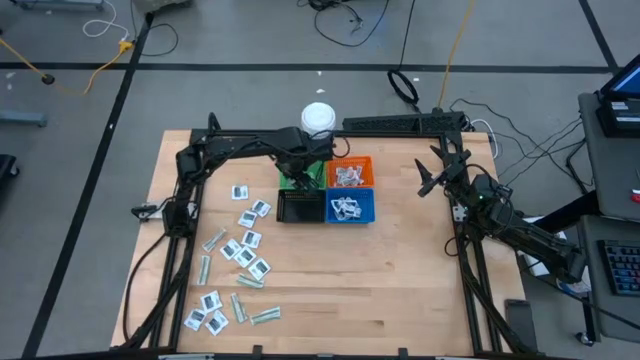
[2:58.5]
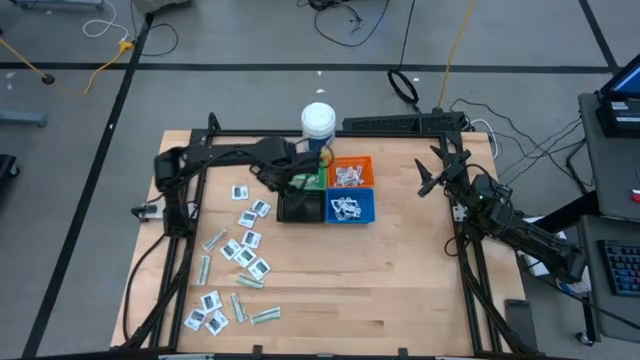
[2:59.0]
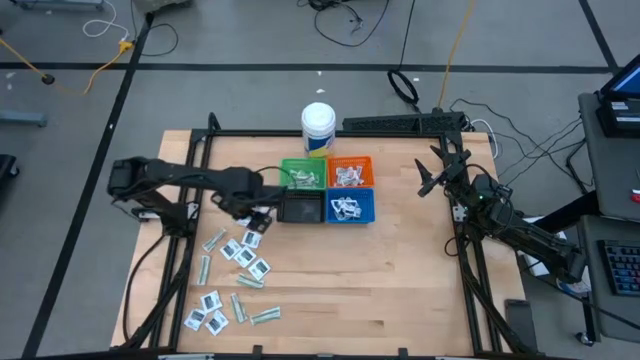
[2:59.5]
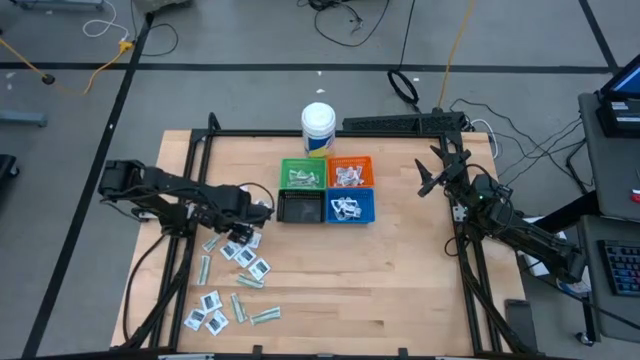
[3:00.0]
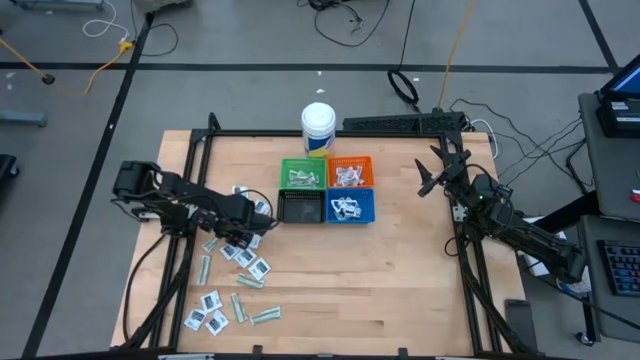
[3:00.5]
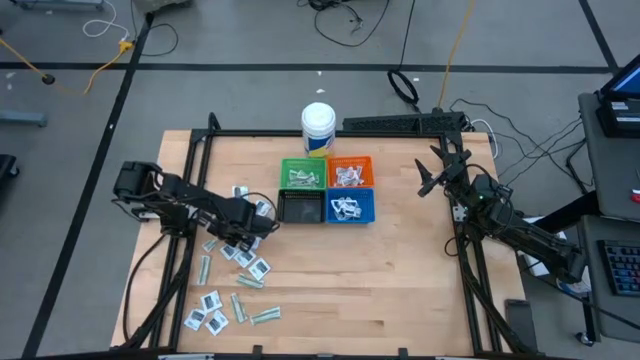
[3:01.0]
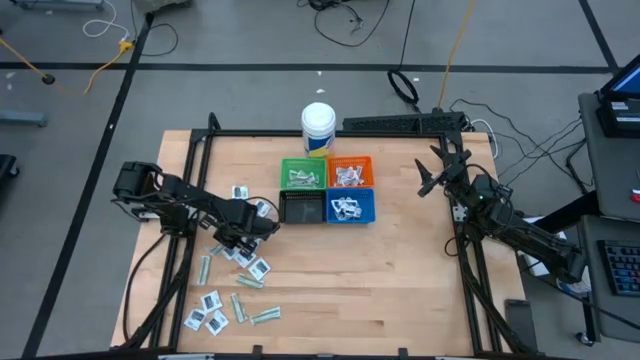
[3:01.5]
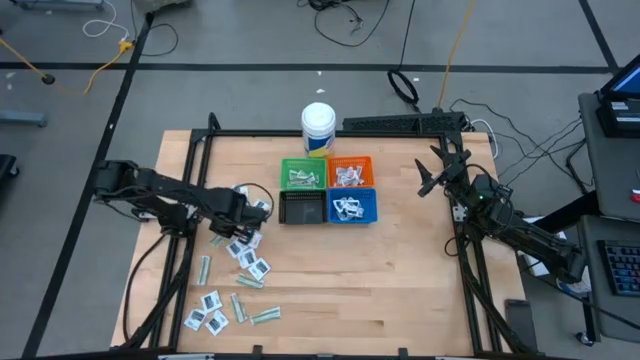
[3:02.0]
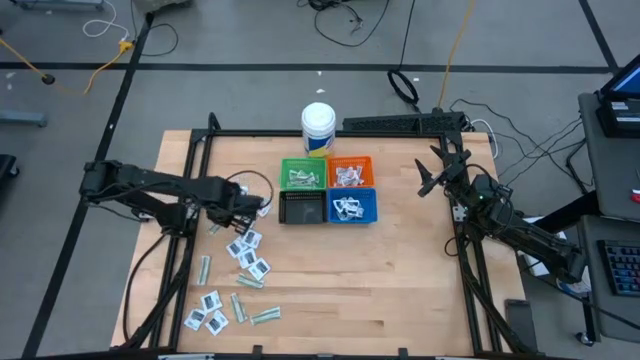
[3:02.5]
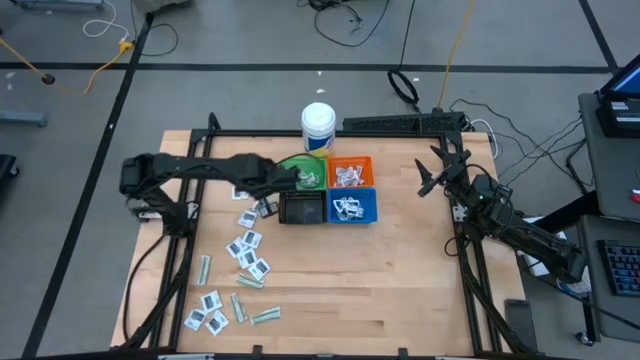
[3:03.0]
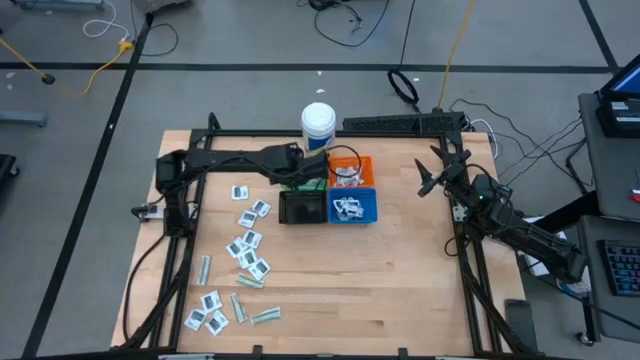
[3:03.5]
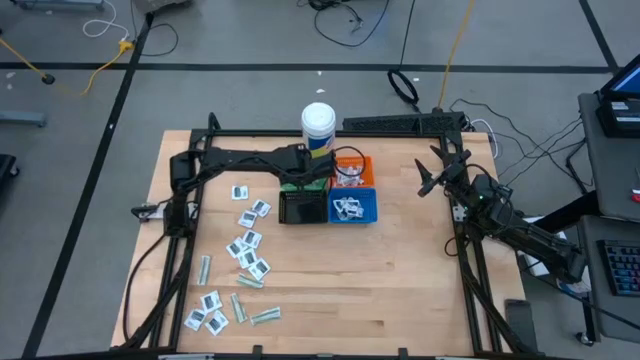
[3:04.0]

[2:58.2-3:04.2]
Task: Pick & Place First Aid Supplies
Put the green bandage pad into the green basket

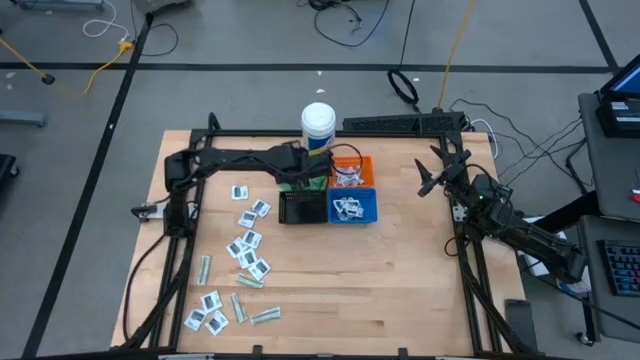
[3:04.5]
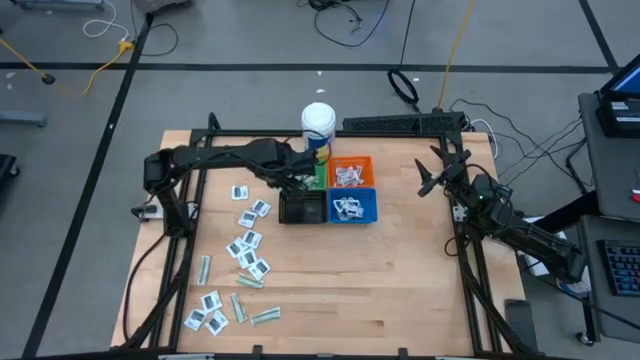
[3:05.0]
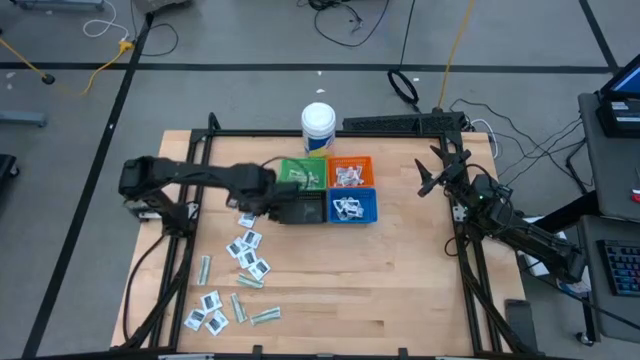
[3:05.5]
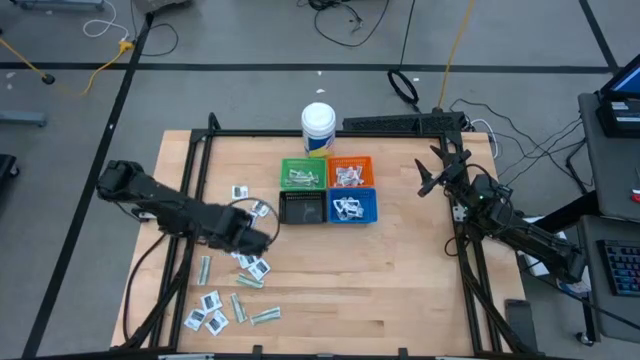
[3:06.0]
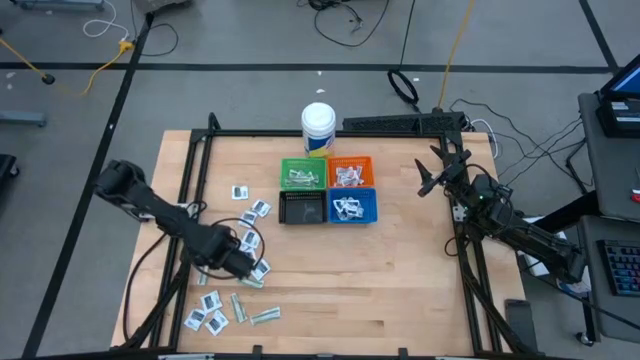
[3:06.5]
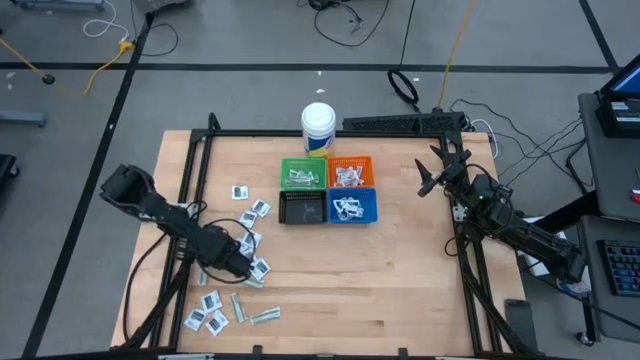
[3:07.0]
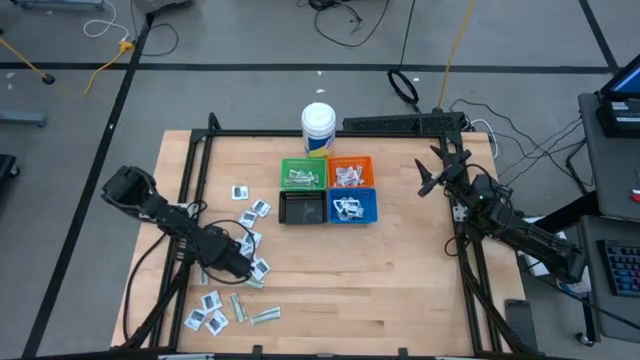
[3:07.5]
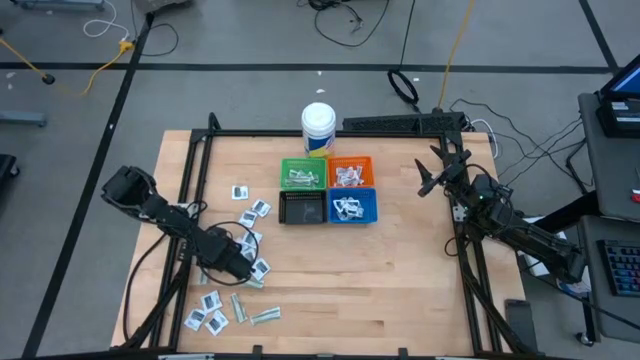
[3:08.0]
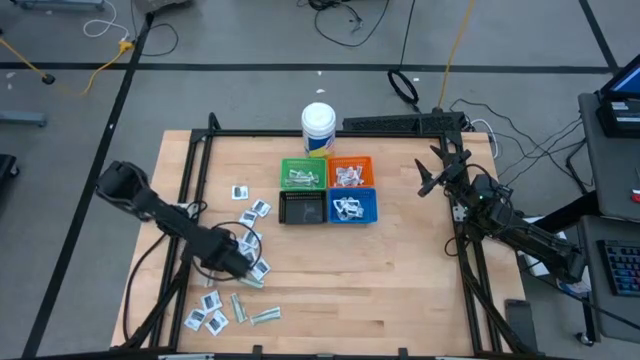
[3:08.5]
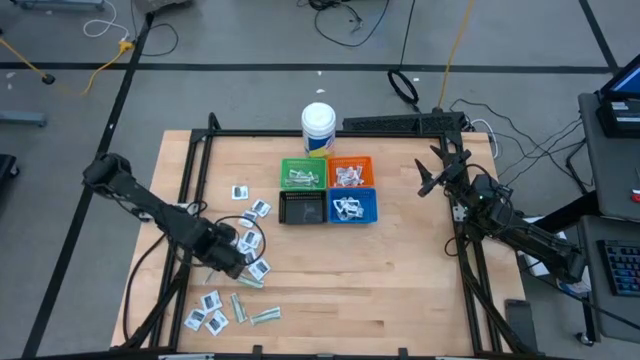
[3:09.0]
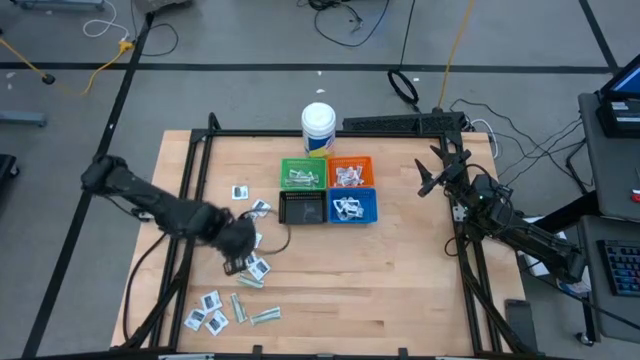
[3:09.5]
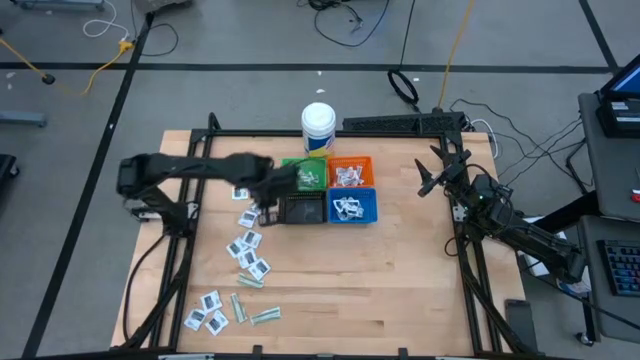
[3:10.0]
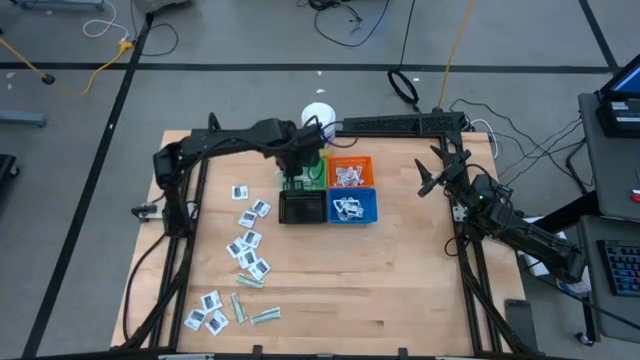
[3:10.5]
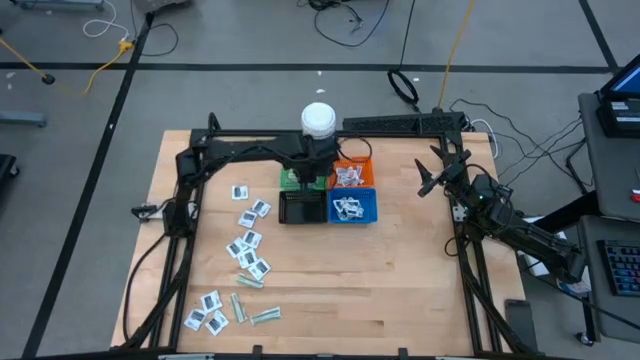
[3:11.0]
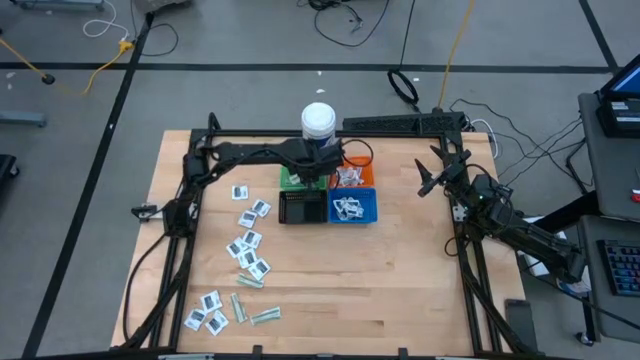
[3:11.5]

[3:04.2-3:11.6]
Put the green bandage pad into the green basket

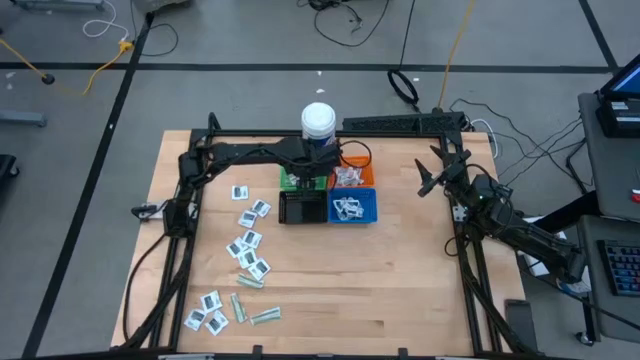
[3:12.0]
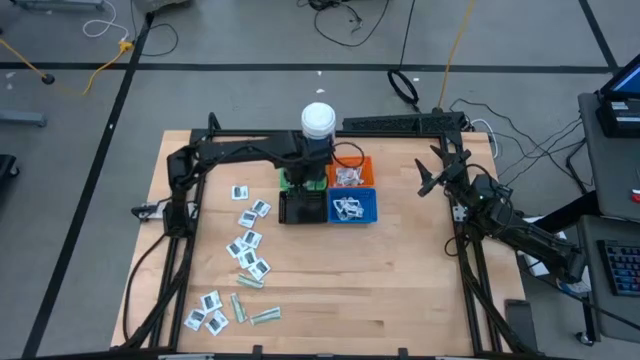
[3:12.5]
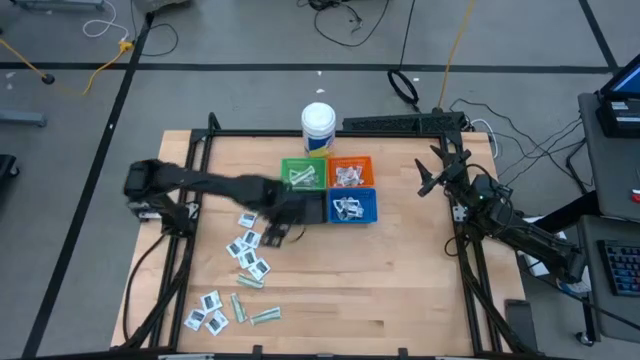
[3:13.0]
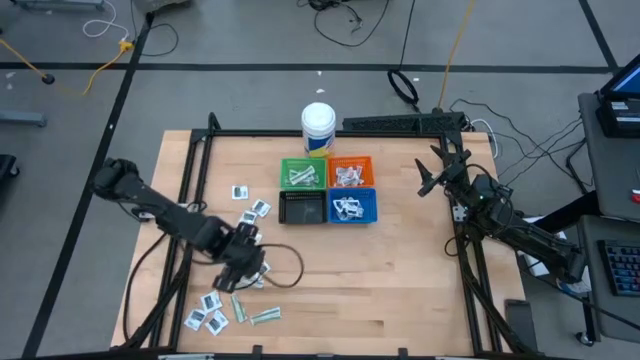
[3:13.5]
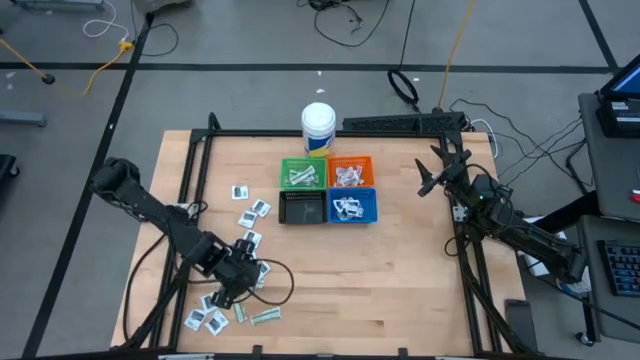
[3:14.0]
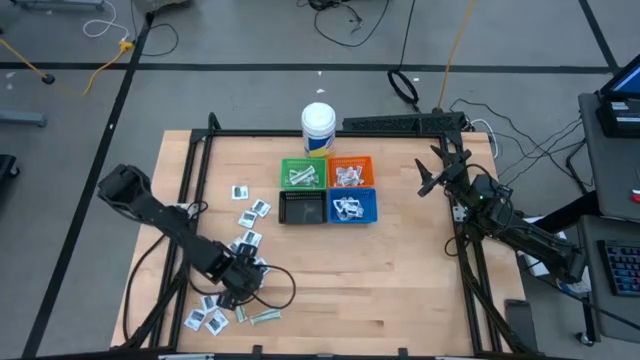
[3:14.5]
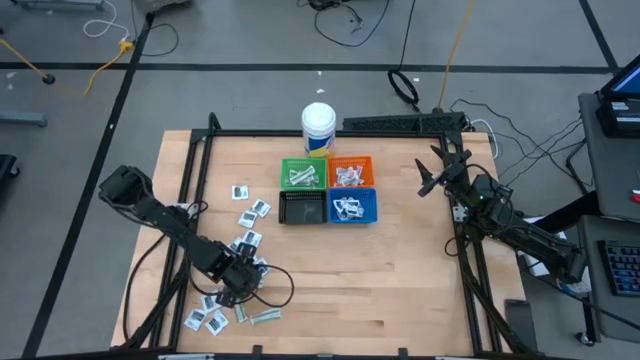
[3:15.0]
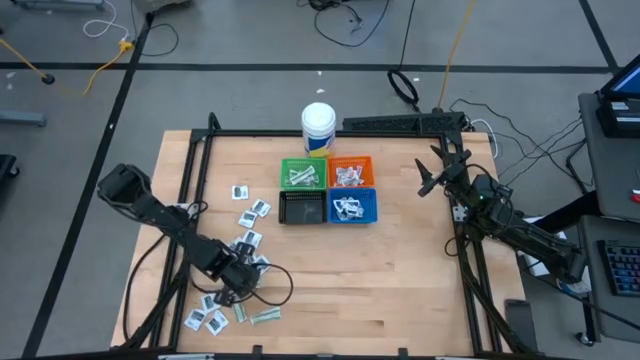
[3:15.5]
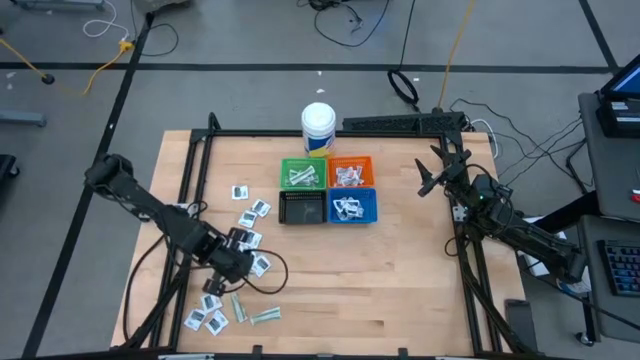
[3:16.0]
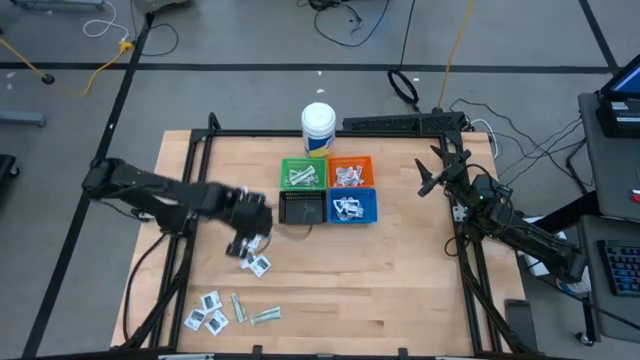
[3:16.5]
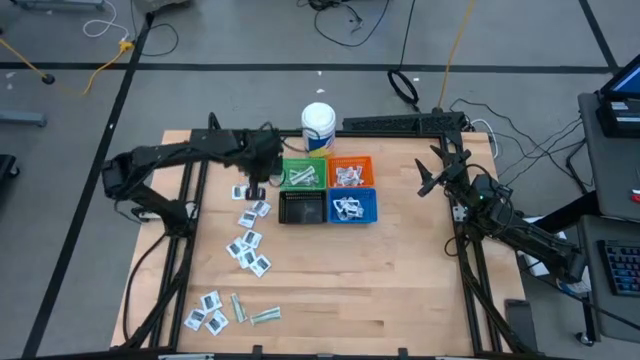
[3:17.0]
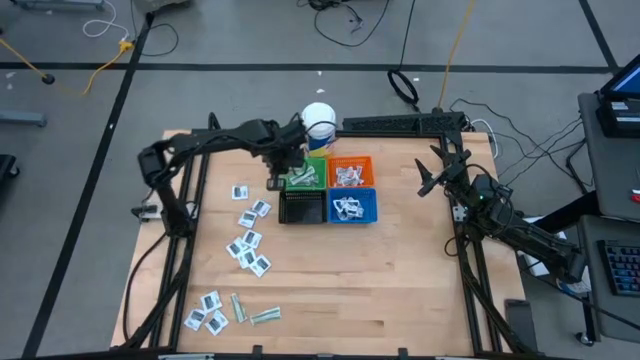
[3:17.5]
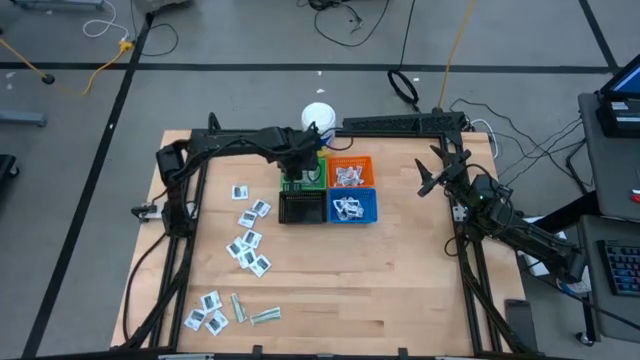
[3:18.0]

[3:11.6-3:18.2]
Put the green bandage pad into the green basket

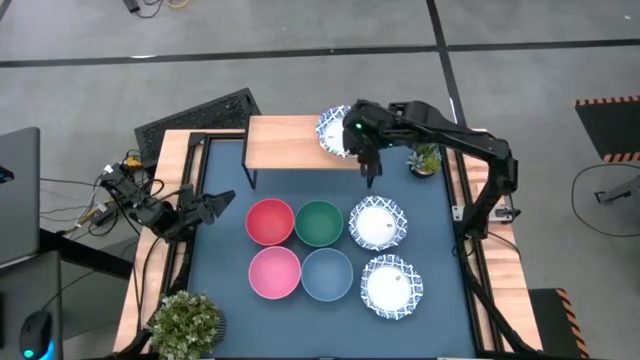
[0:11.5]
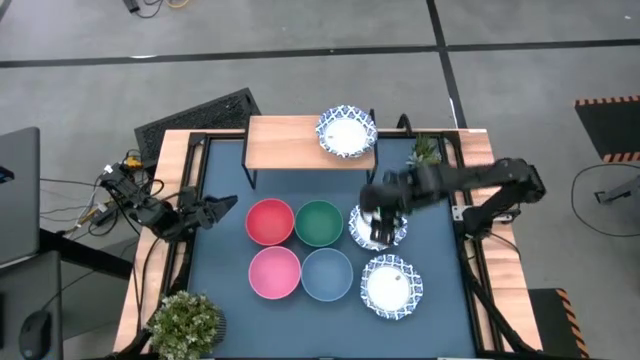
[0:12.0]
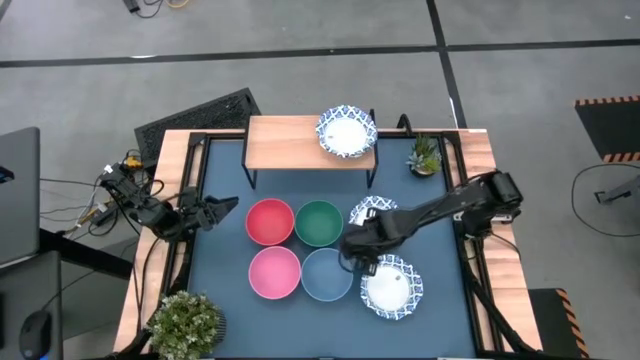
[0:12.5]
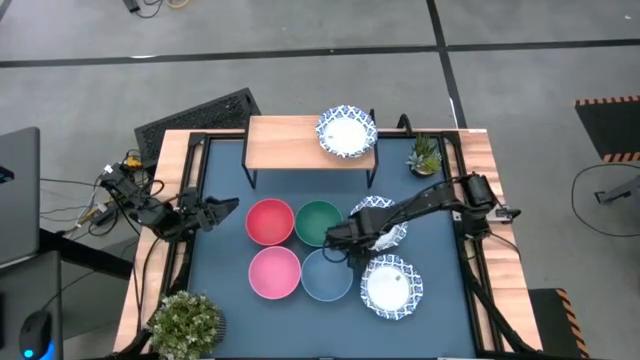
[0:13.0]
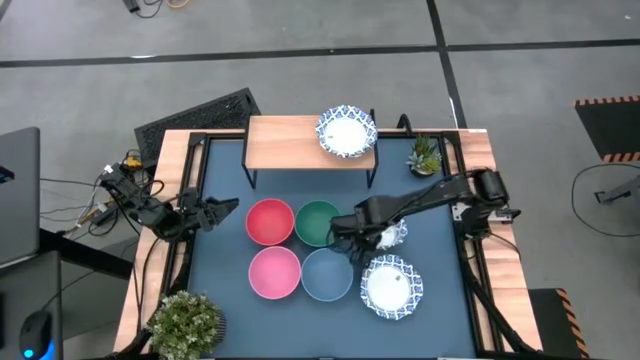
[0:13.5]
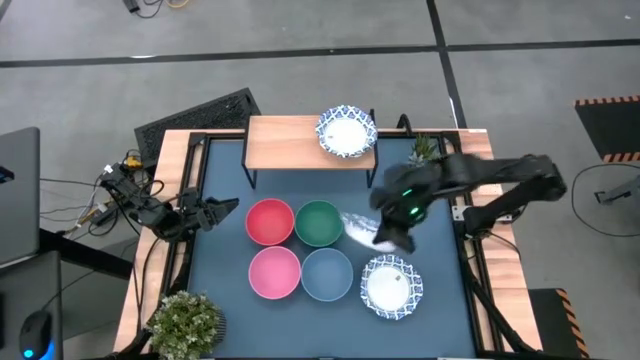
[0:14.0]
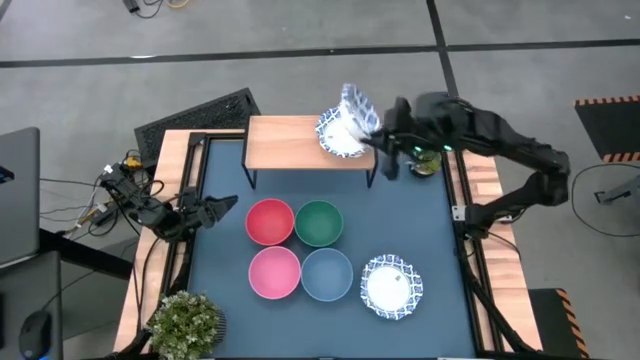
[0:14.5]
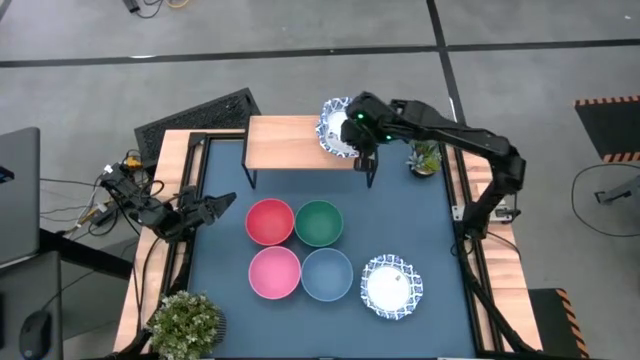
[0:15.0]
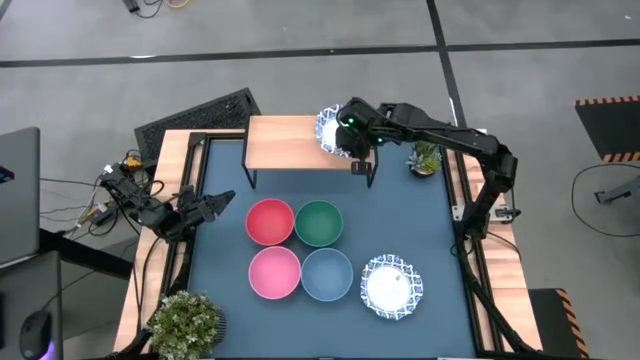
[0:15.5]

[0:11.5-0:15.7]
Task: Place and stack bowls onto a shelf
Stack the top white patterned bowl on top of the white patterned bowl on the shelf
